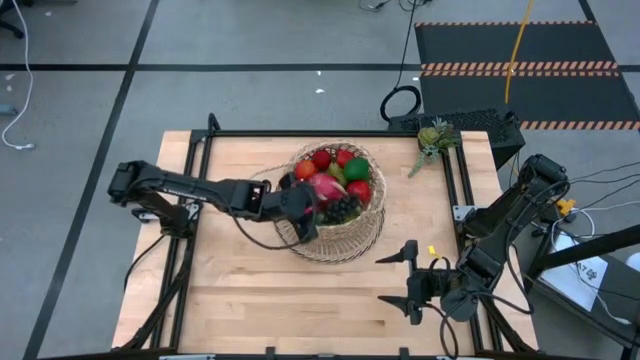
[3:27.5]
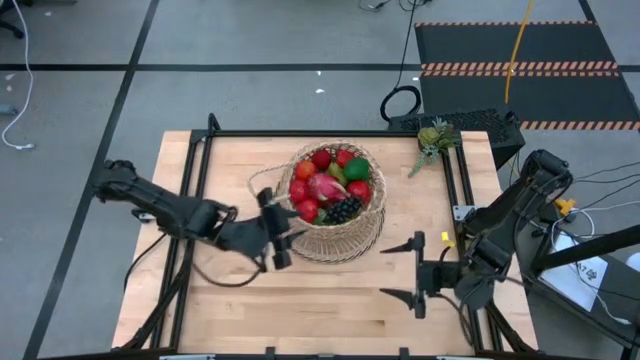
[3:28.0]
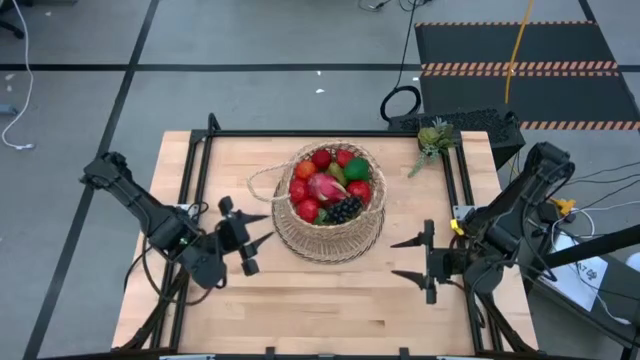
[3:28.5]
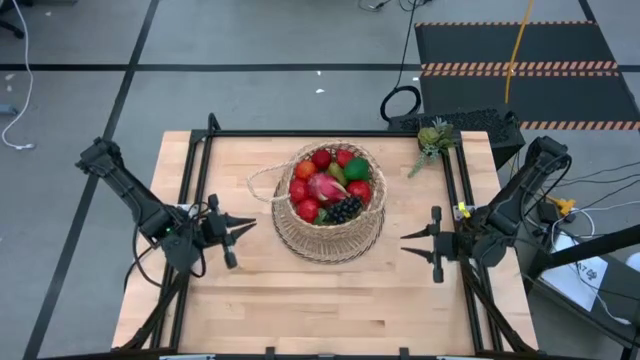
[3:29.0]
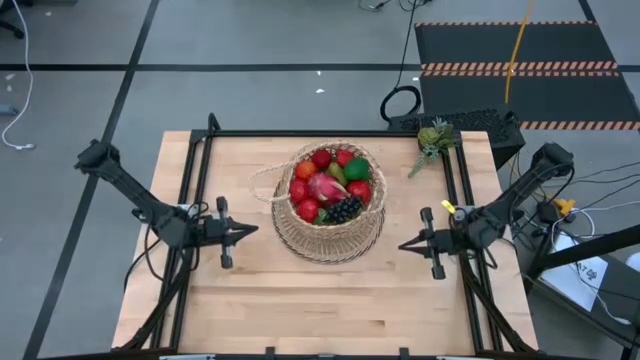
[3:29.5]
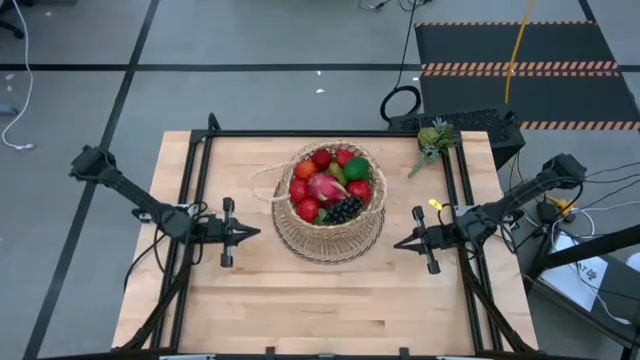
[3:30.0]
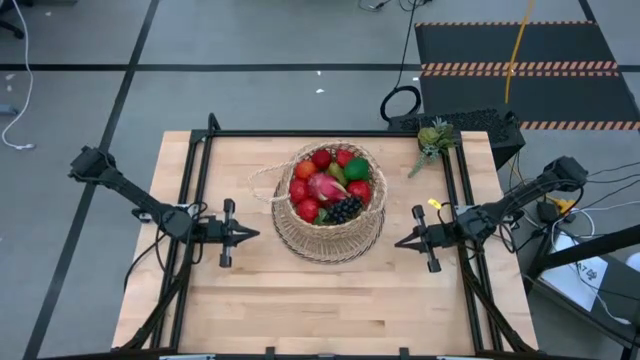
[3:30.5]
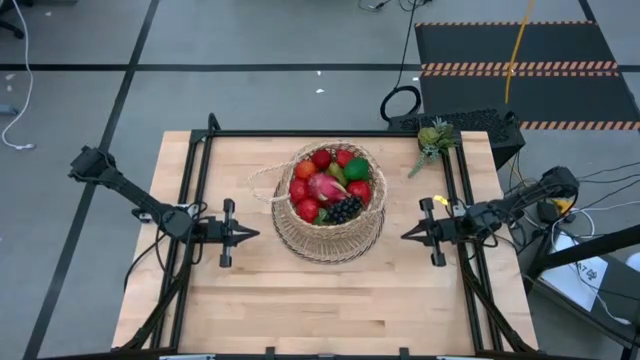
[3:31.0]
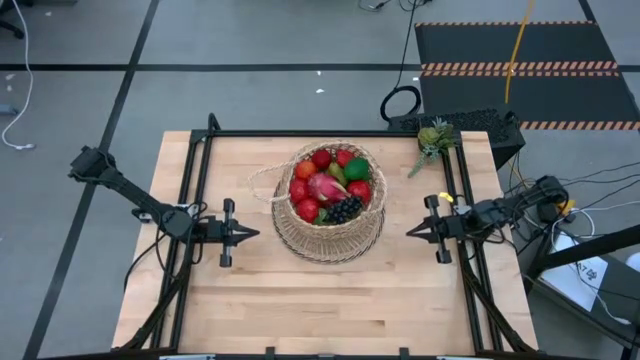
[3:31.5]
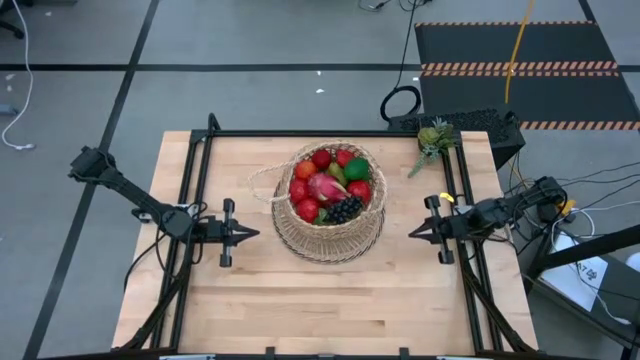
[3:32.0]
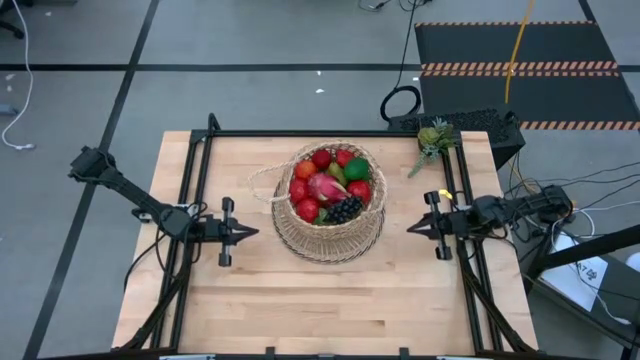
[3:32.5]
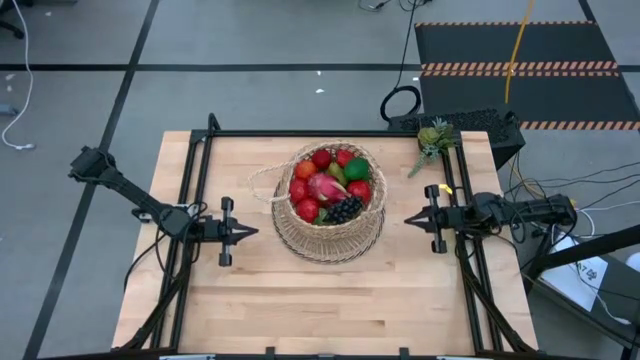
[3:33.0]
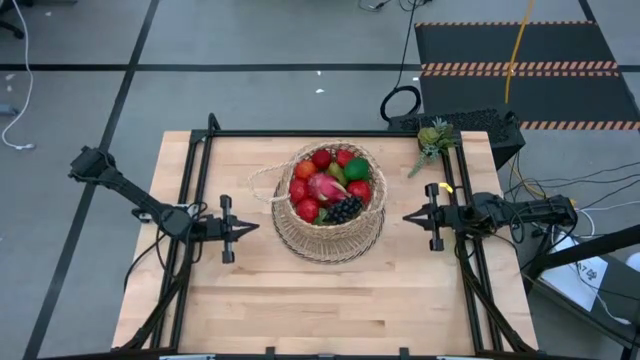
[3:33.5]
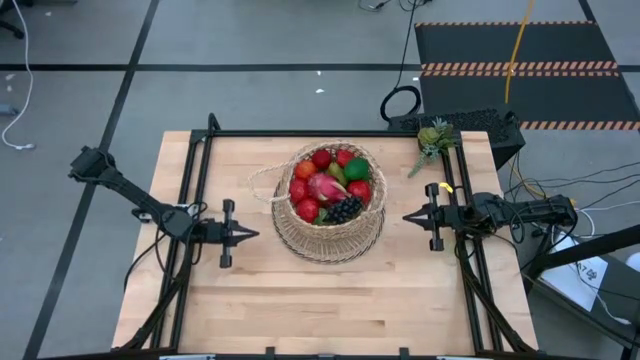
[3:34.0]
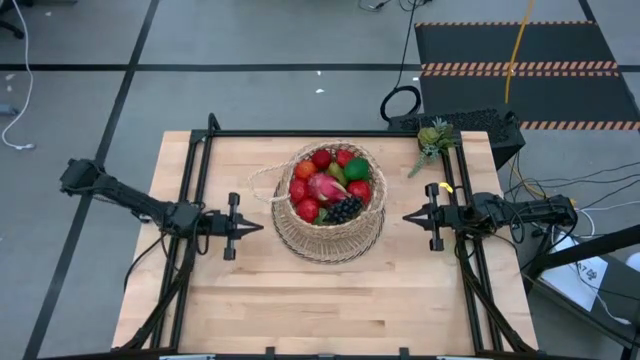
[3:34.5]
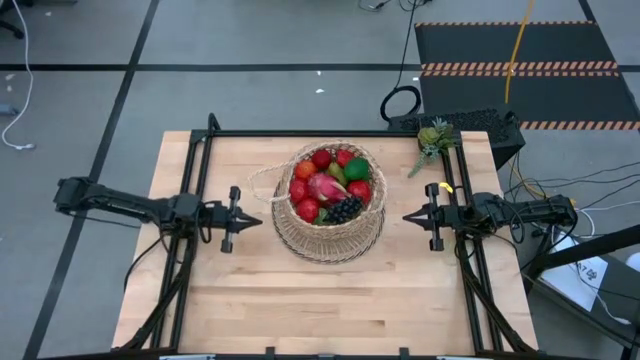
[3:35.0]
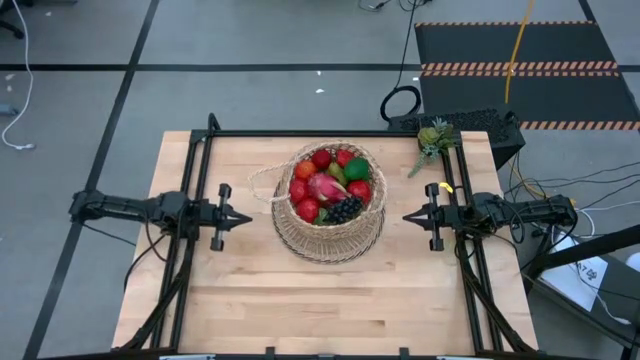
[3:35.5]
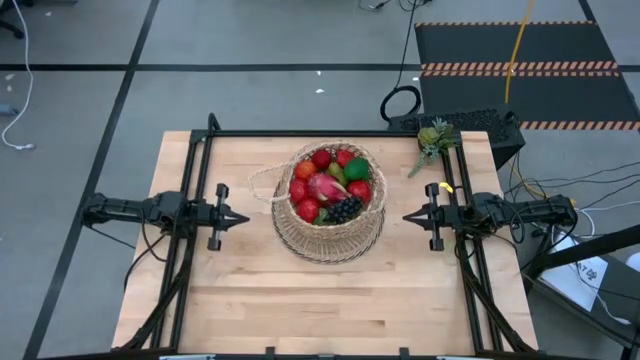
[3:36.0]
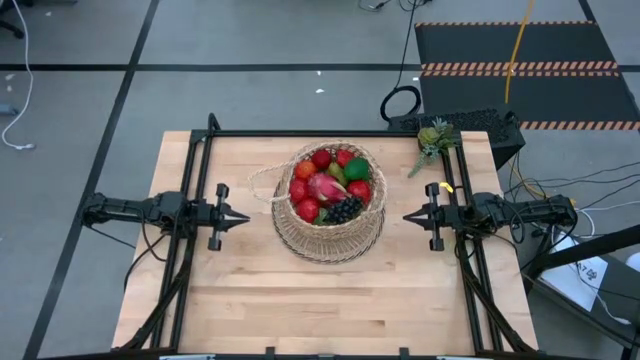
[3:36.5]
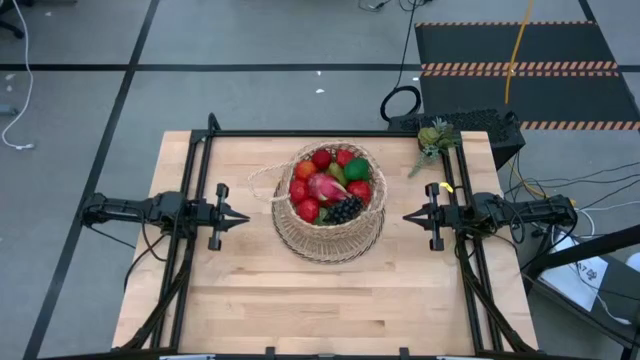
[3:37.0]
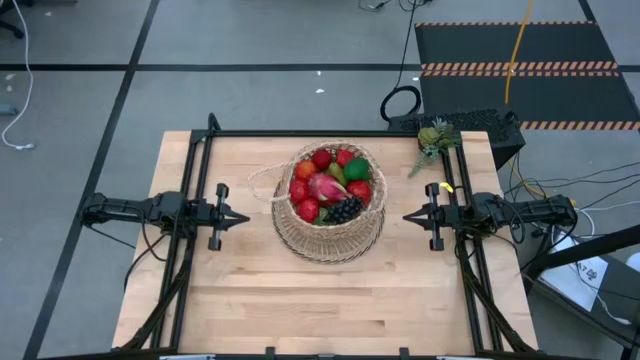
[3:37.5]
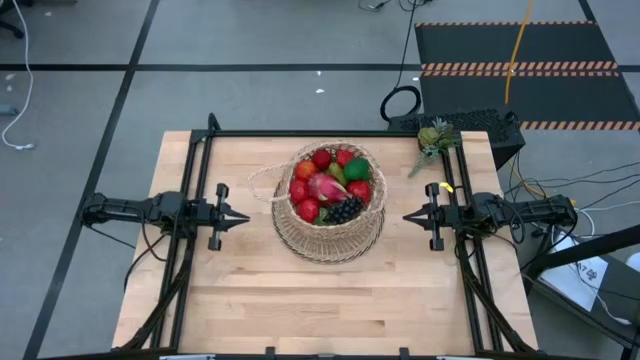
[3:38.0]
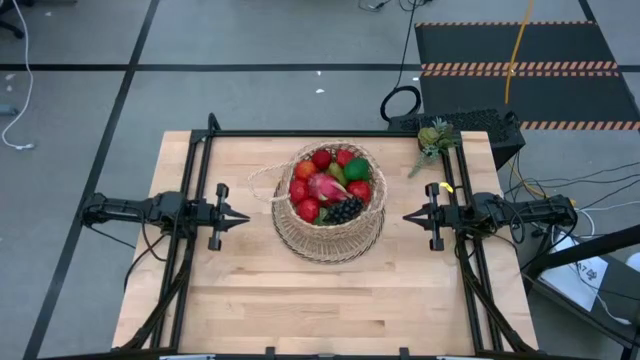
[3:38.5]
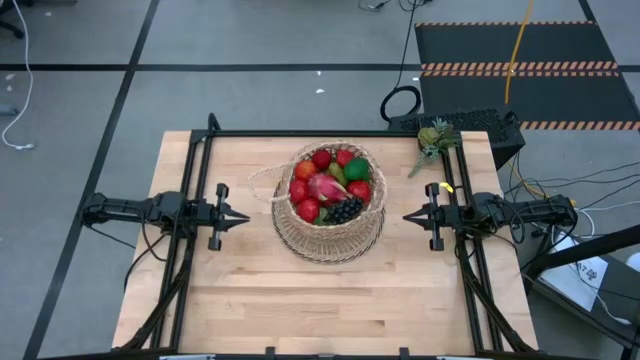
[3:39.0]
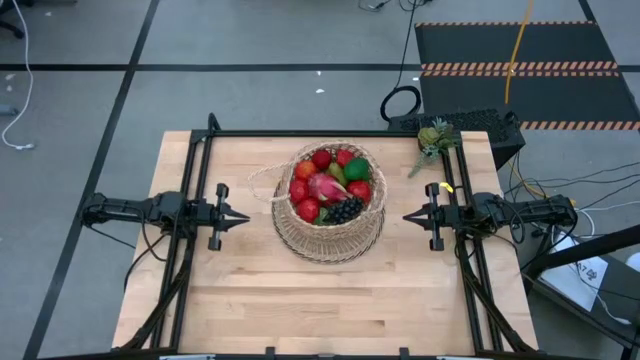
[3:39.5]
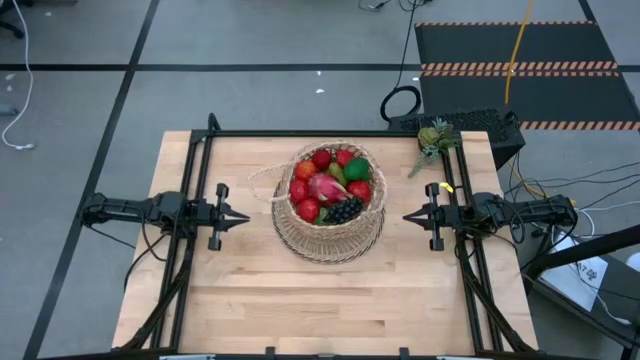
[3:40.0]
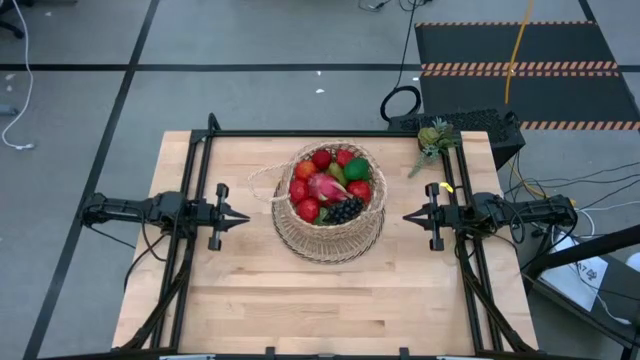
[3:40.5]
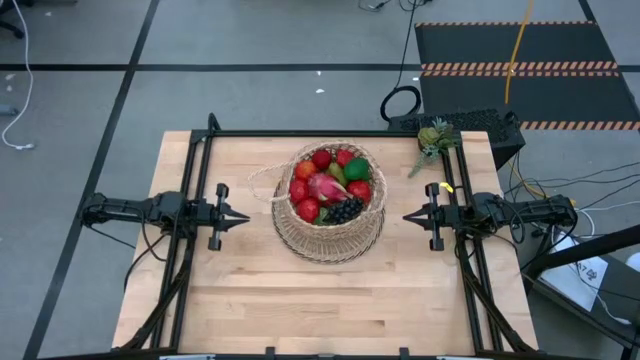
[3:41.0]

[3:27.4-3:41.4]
Task: Build produce basket
Return to Home Position

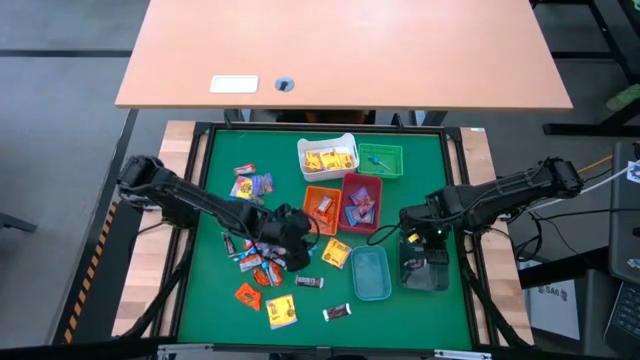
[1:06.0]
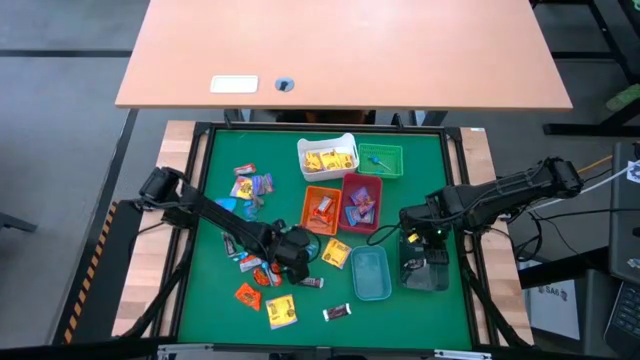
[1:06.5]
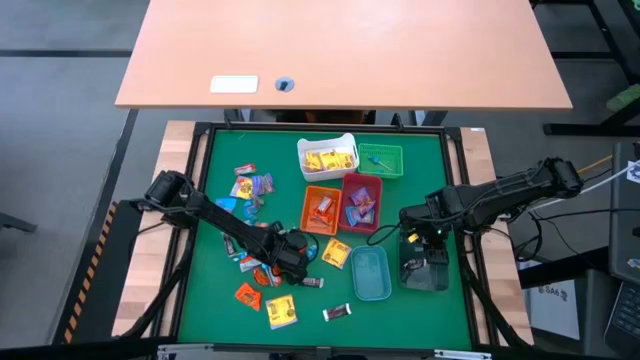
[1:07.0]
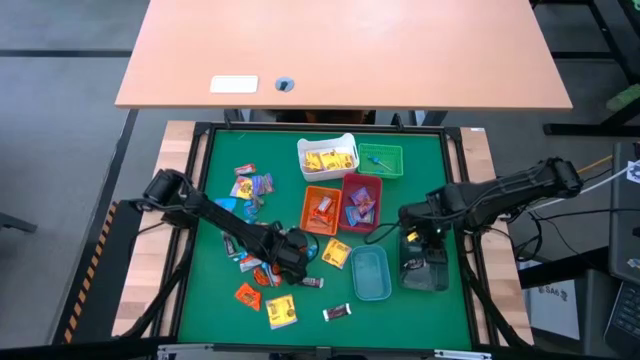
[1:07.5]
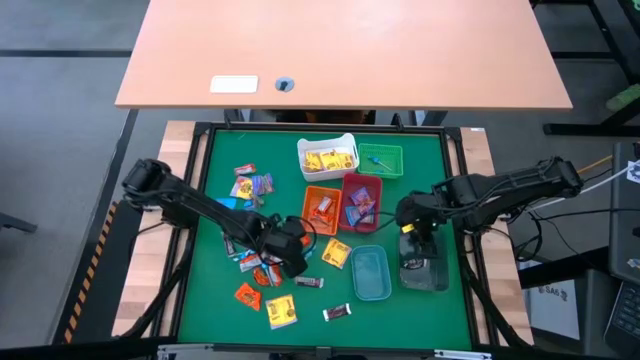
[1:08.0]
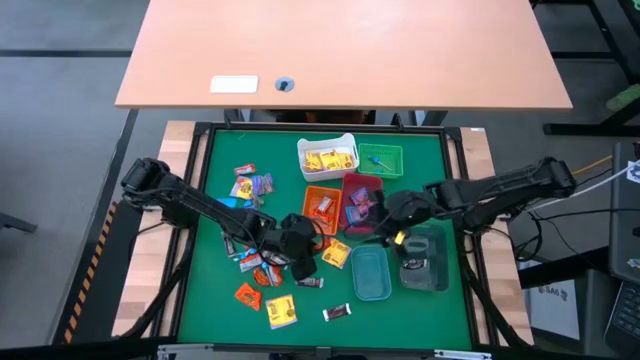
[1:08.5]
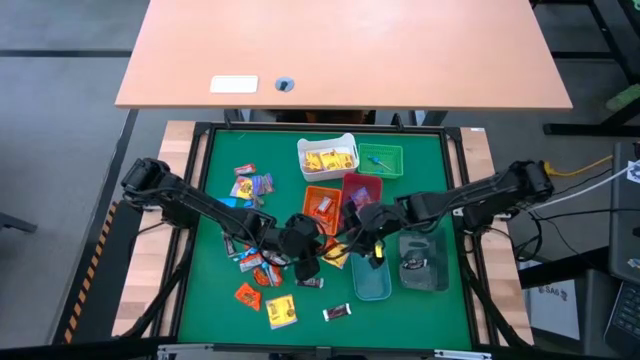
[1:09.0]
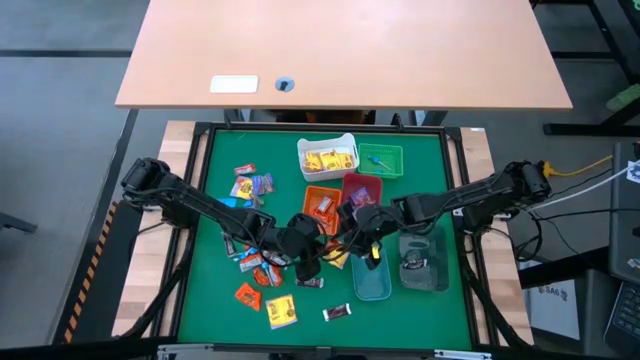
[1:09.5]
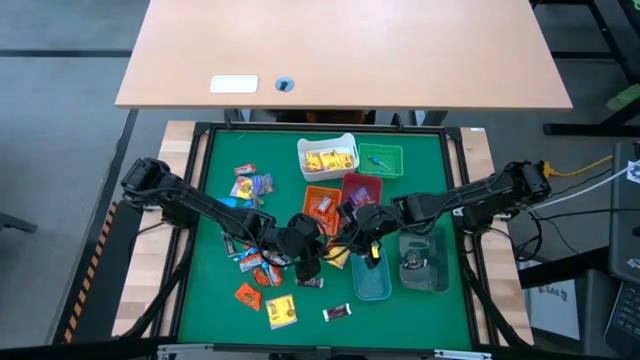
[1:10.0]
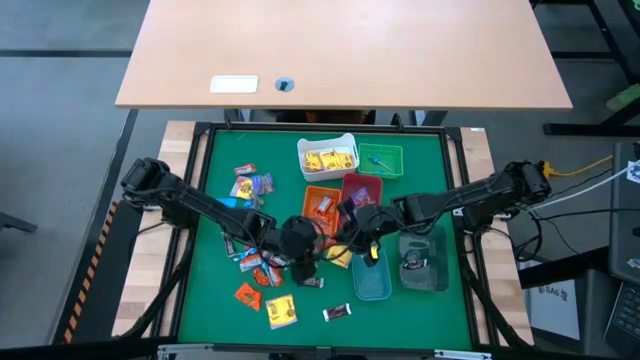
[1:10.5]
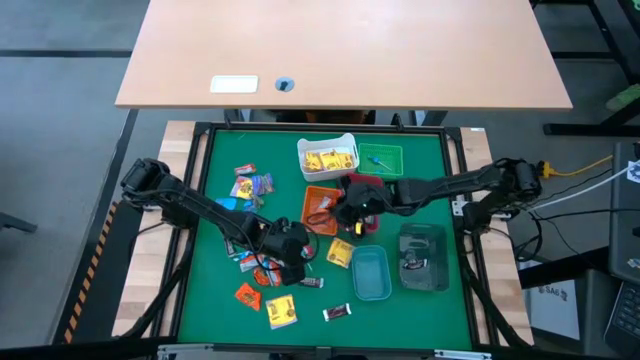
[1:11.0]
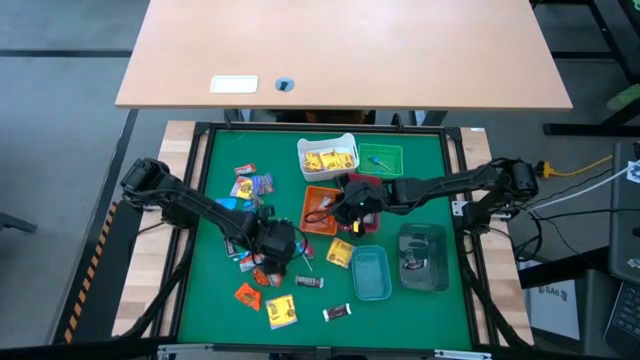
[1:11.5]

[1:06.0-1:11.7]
Task: Sort candy
Put the orange chocolate into the orange basket

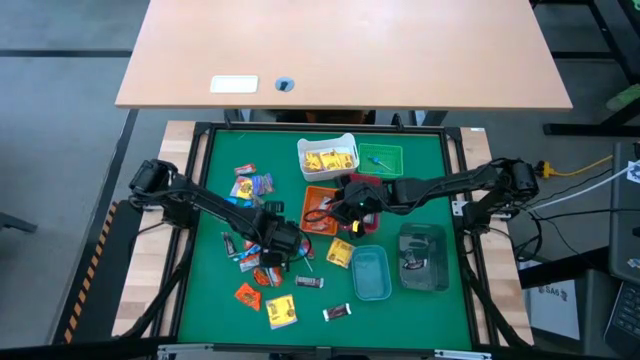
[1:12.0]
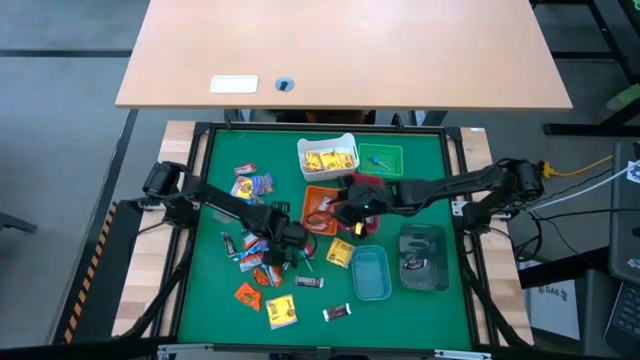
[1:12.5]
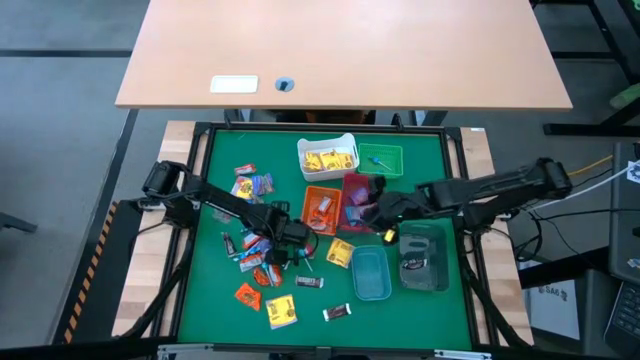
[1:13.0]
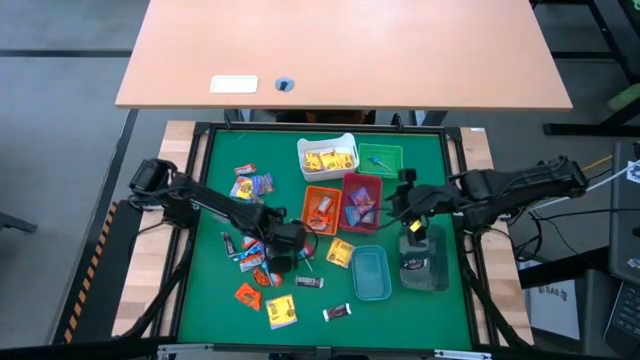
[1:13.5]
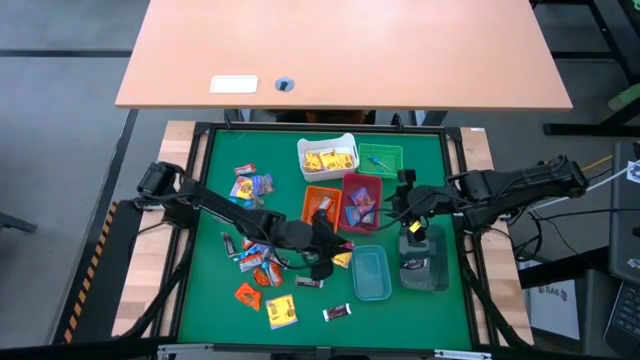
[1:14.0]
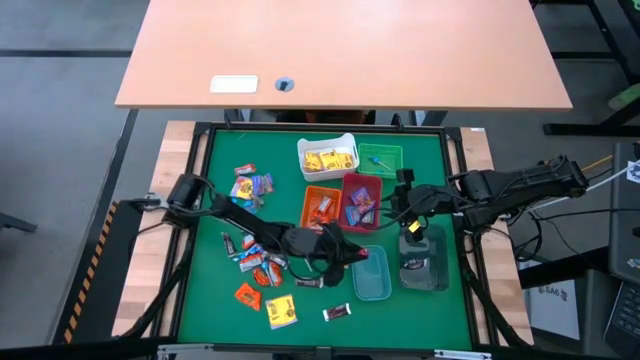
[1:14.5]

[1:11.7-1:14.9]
Put the red candy into the blue bin
